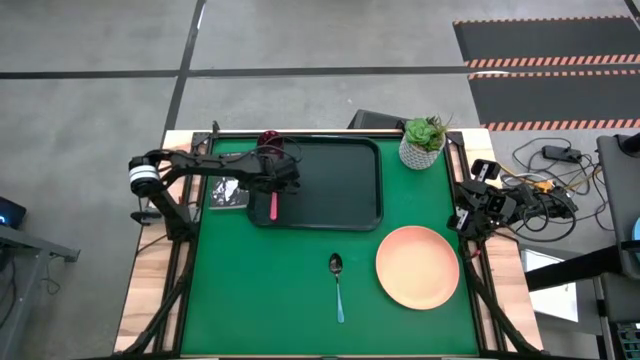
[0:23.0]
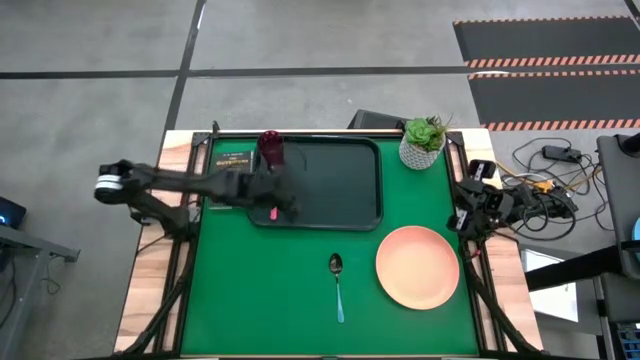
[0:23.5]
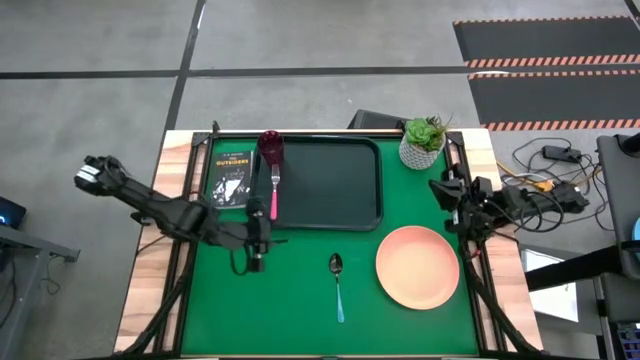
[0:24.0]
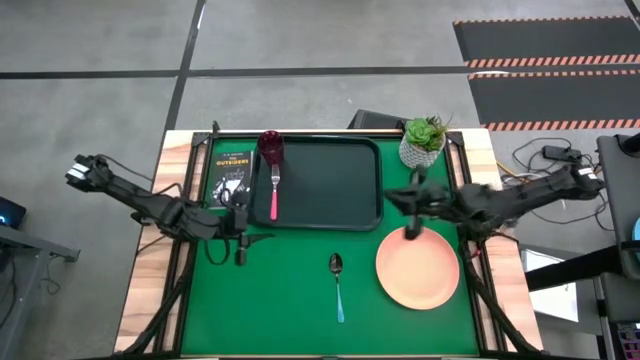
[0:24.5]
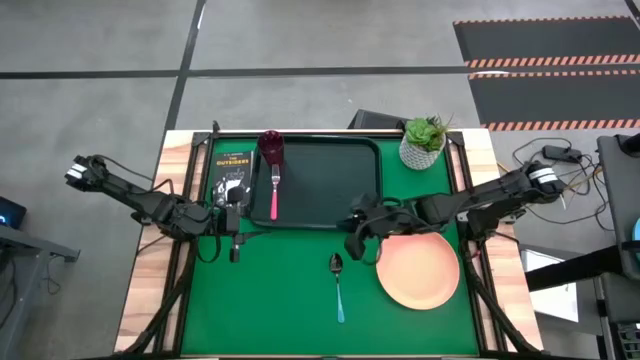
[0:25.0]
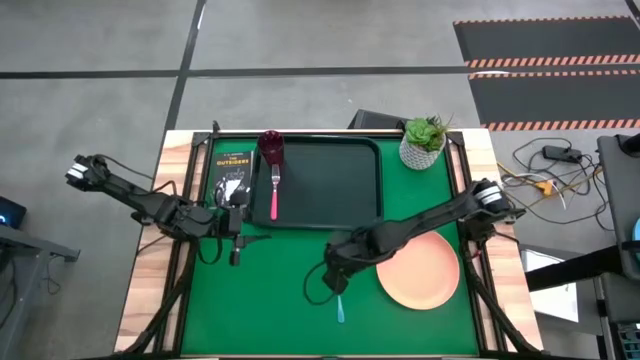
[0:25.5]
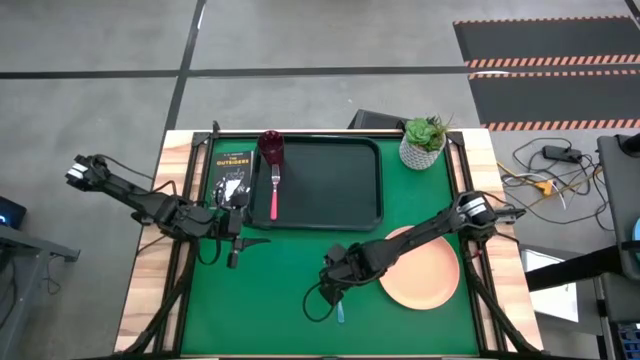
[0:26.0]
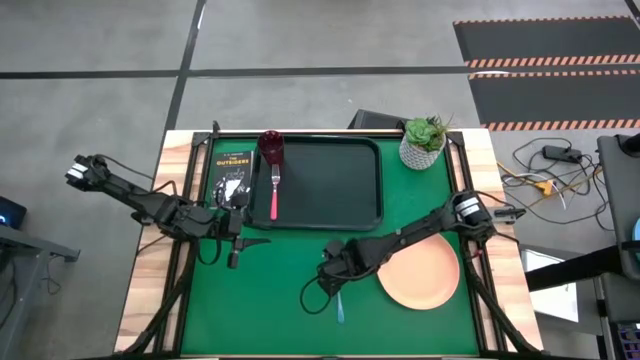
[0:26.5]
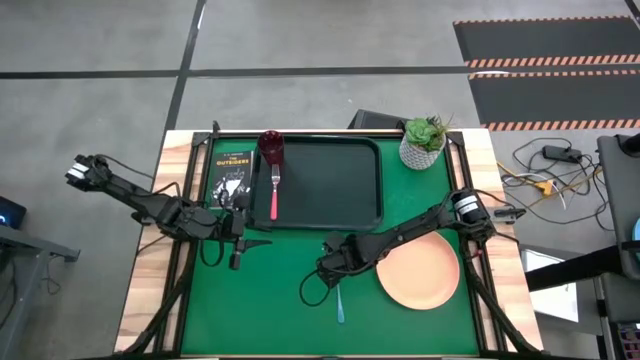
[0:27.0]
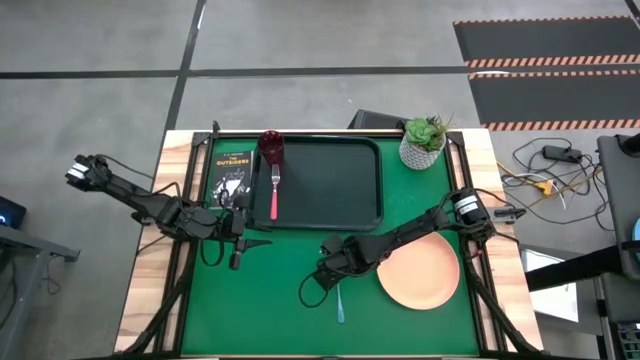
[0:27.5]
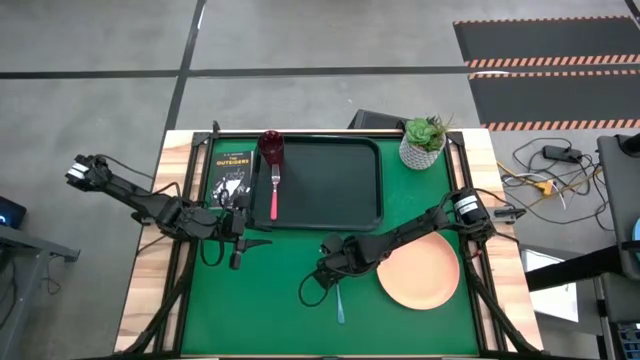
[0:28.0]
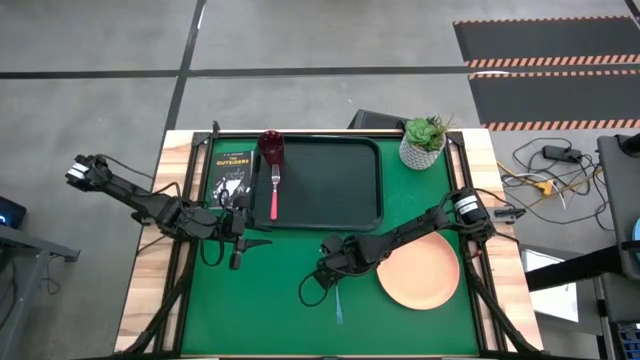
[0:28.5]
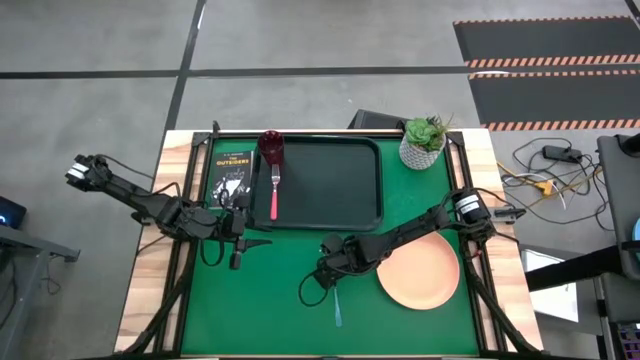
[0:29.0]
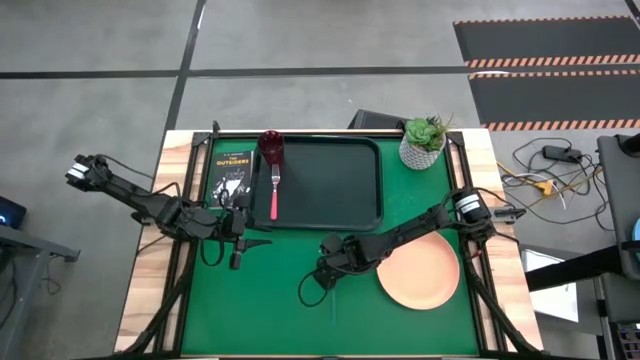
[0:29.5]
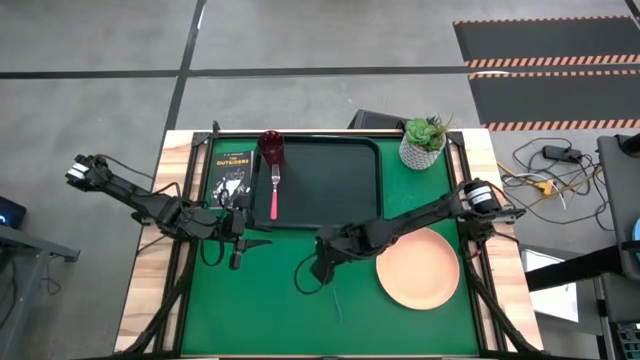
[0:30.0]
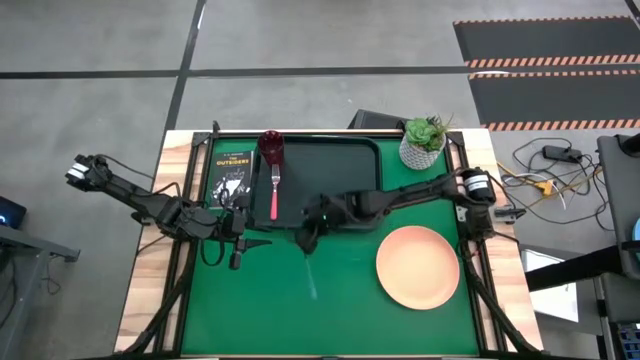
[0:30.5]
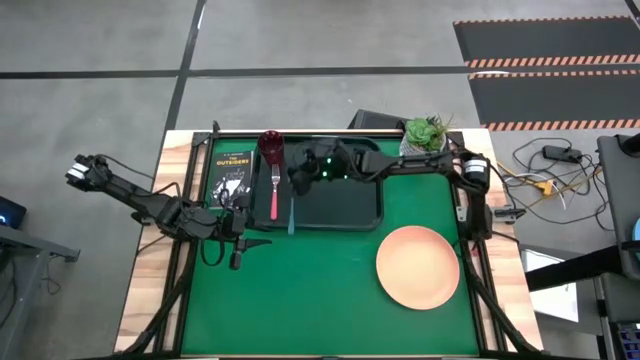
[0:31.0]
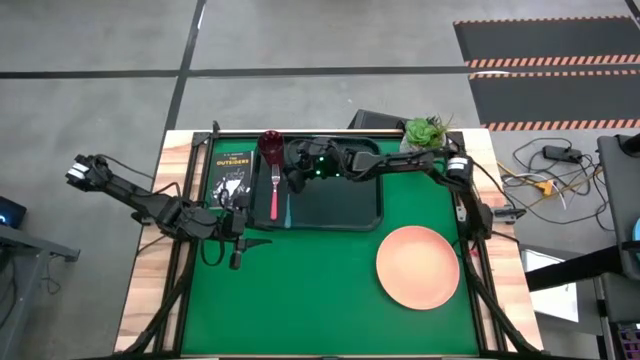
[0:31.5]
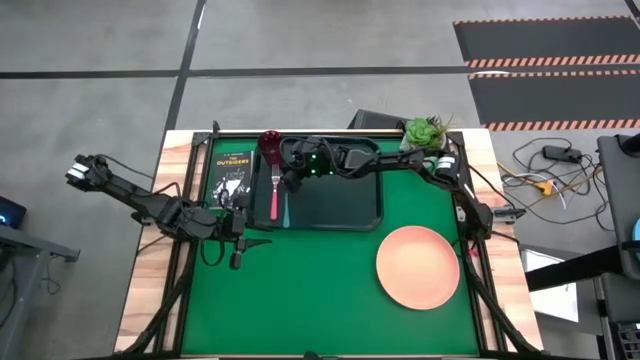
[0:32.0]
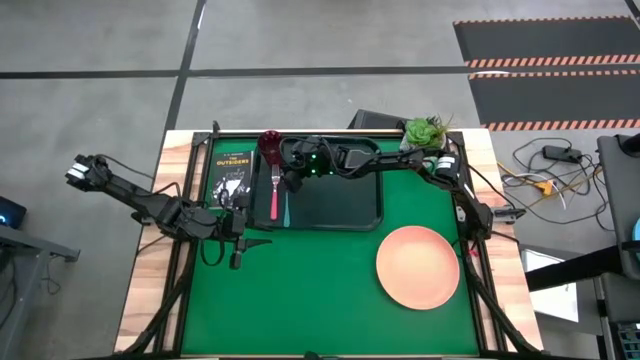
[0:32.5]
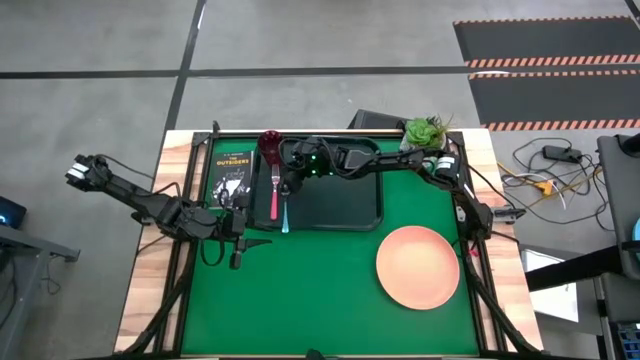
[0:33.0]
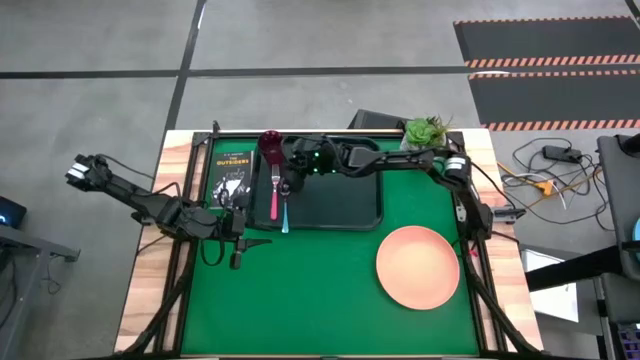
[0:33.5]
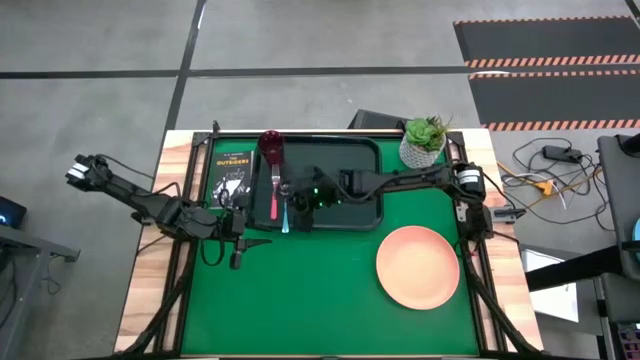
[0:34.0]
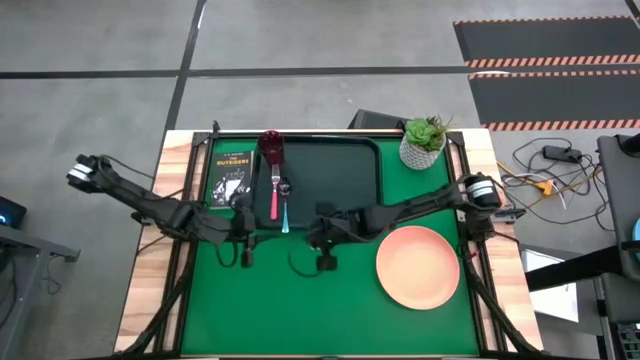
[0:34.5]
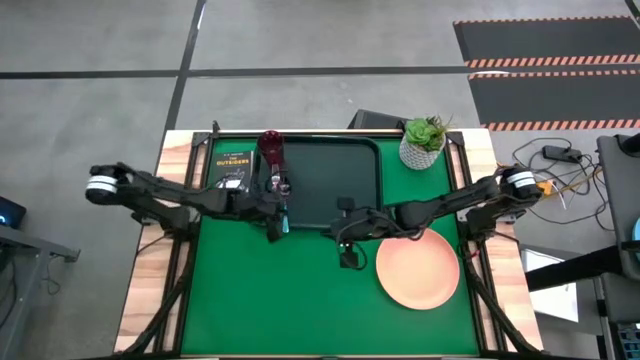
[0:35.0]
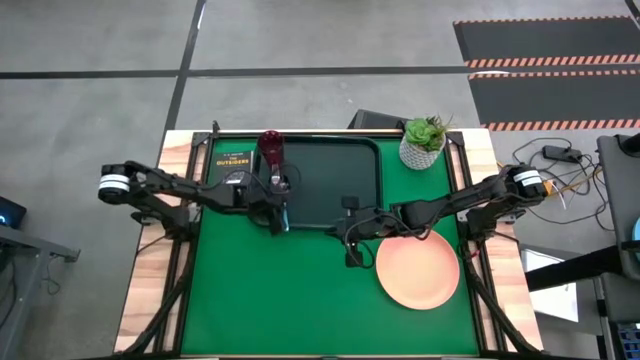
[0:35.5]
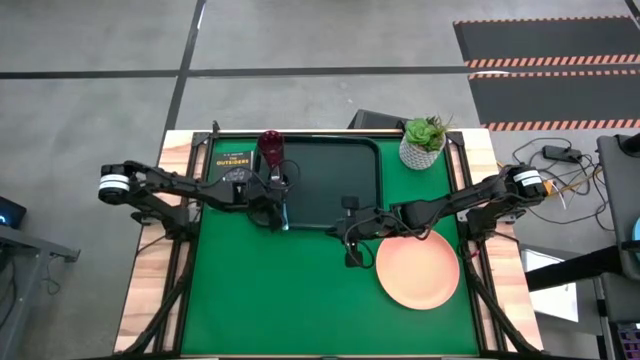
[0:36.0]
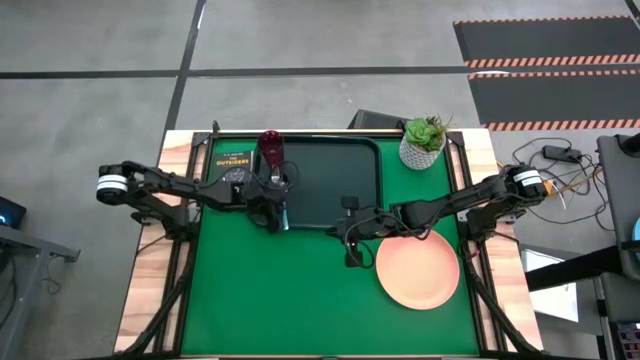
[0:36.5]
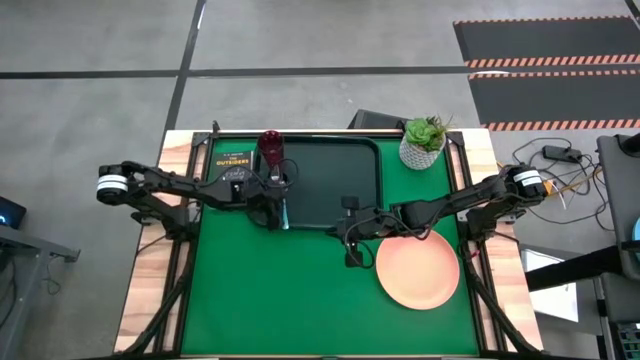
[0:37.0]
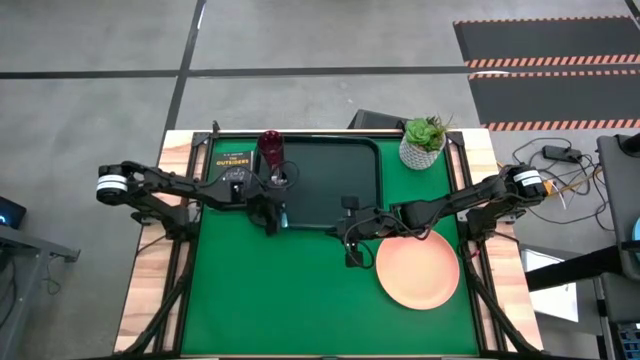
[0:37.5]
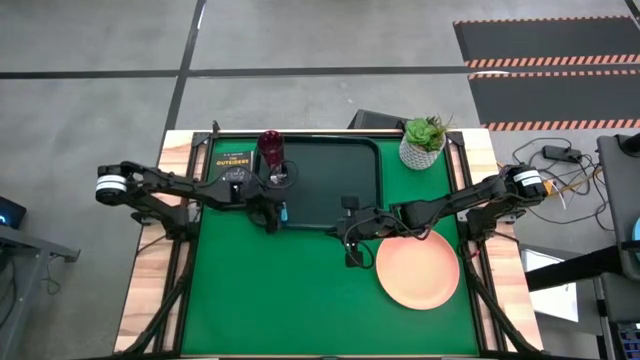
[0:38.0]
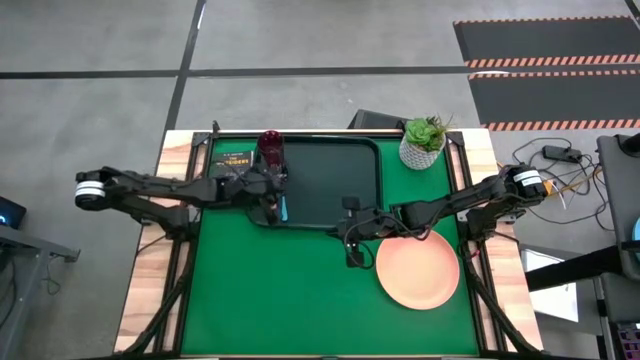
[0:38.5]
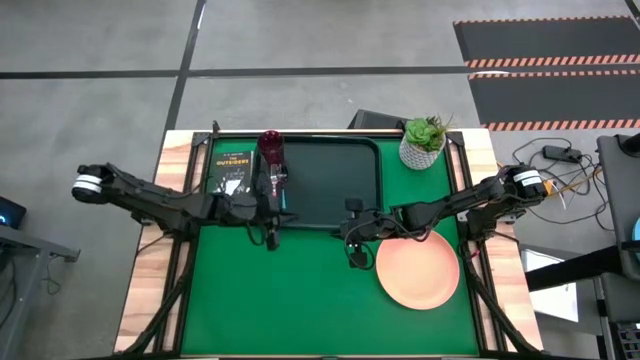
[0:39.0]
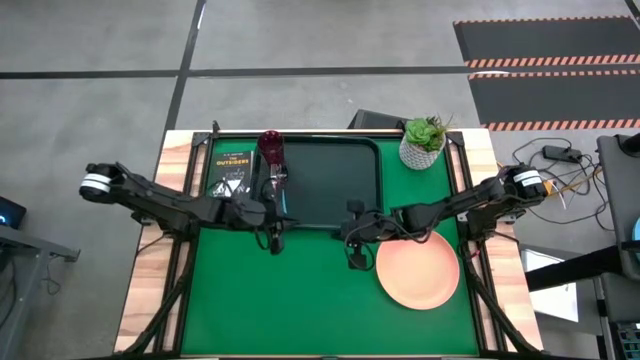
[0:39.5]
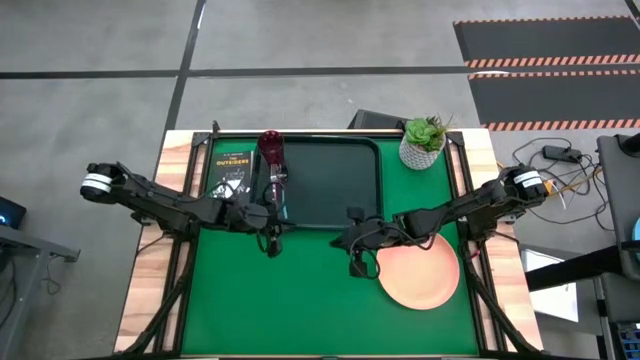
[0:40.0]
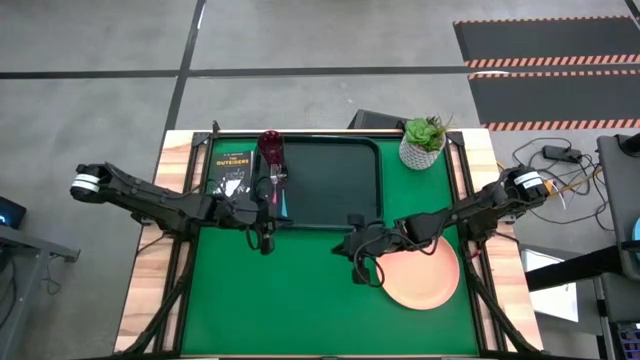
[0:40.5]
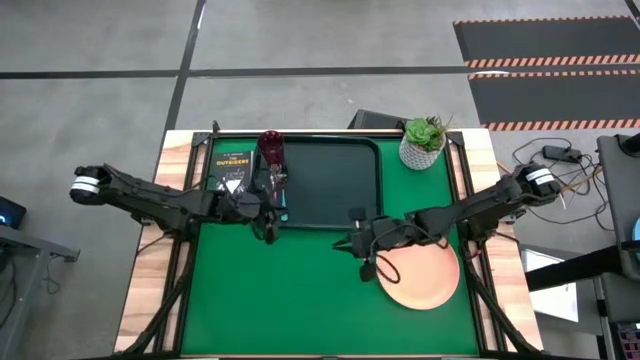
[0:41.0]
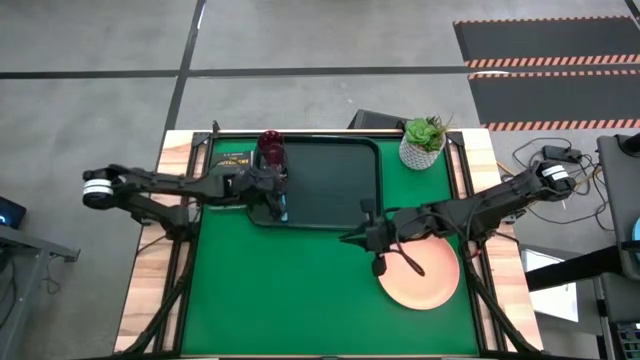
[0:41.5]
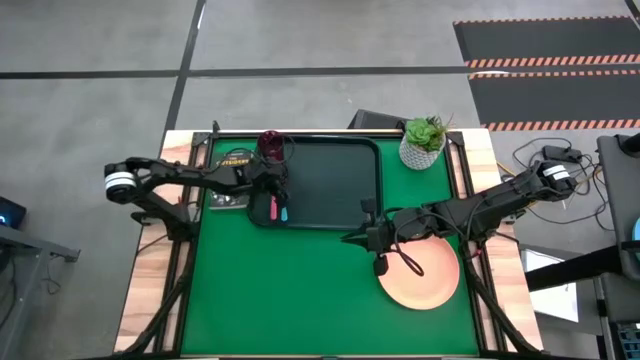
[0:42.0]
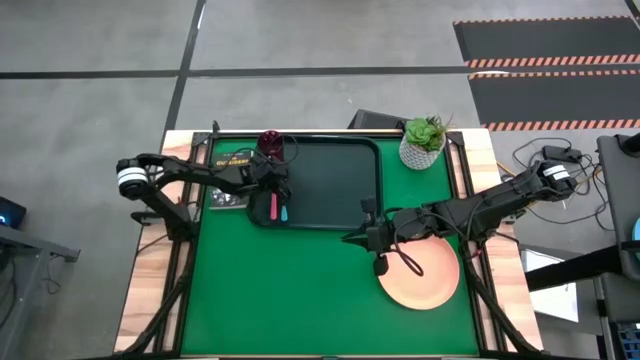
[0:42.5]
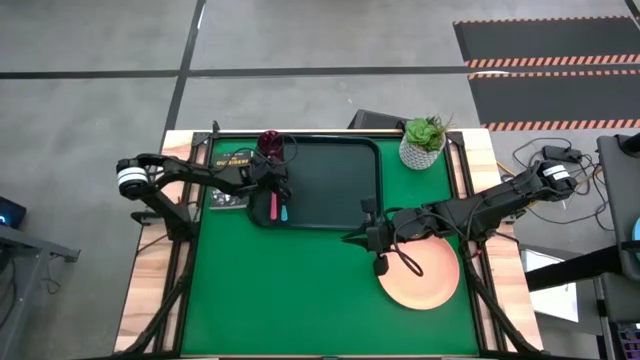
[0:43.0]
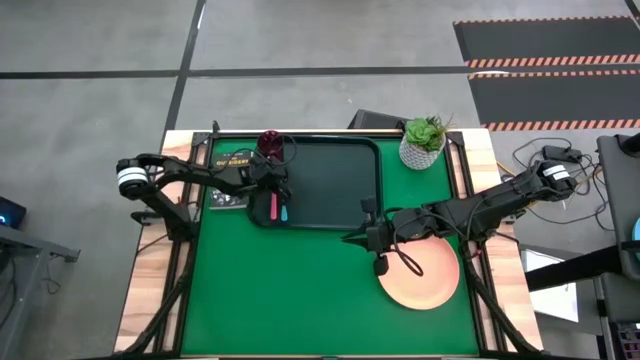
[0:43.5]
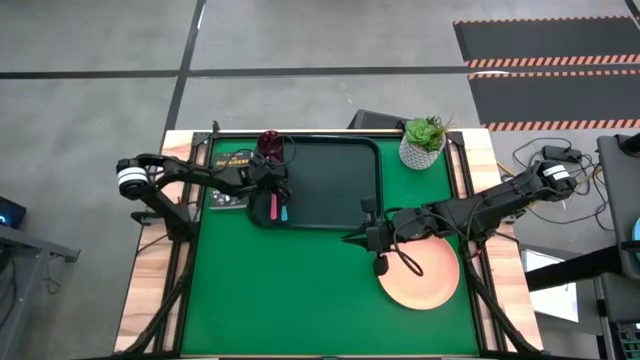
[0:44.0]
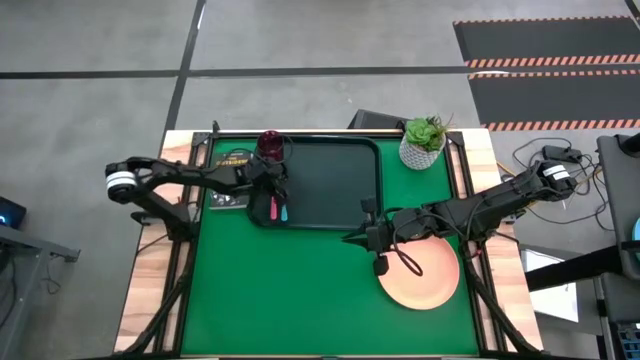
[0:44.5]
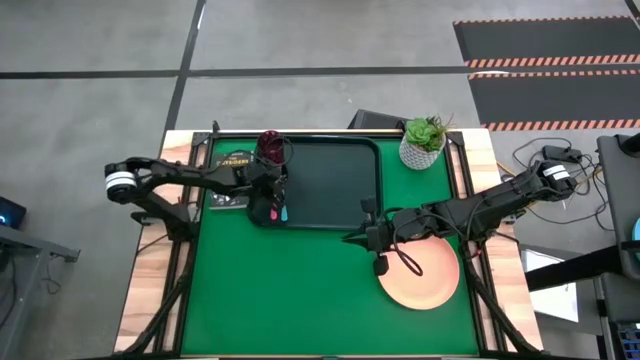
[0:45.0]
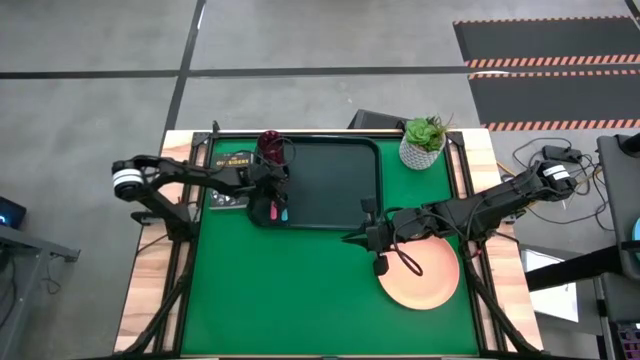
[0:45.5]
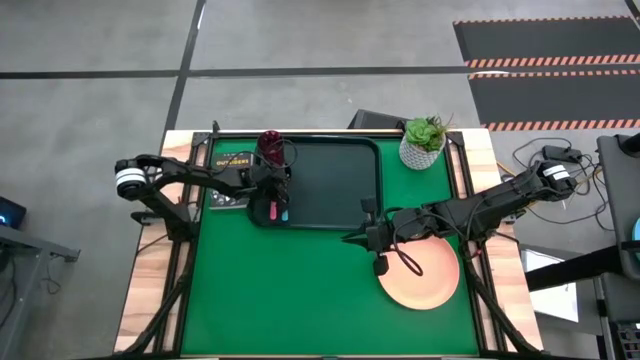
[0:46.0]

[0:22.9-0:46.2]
Task: Pick and place plate/cup/fork/spoon on tray
Put the blue spoon to the right of the pink fork on the black tray
